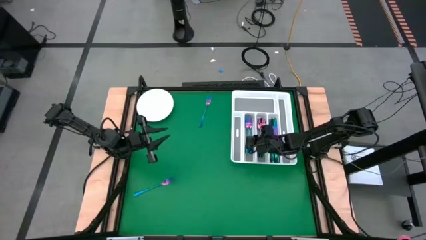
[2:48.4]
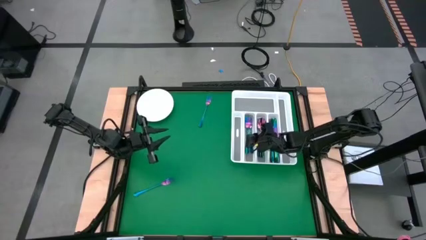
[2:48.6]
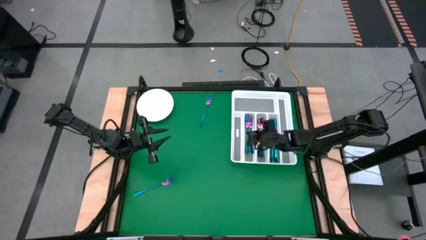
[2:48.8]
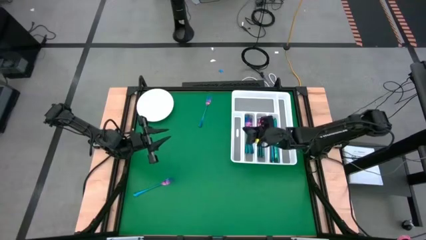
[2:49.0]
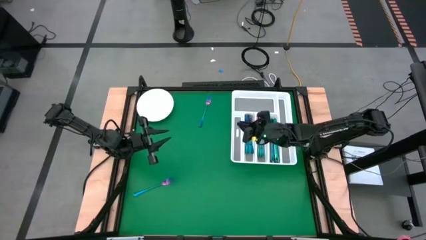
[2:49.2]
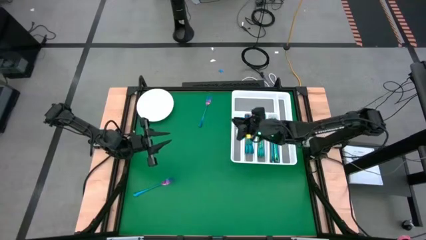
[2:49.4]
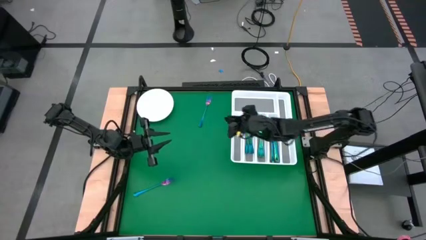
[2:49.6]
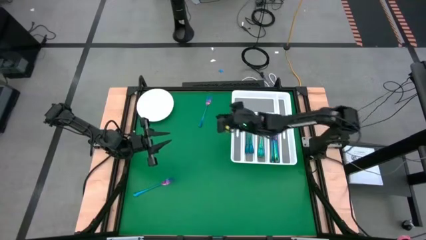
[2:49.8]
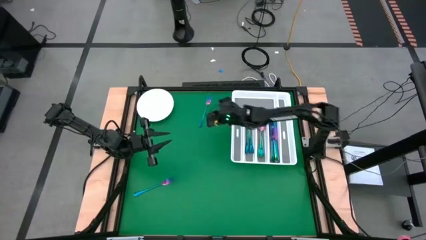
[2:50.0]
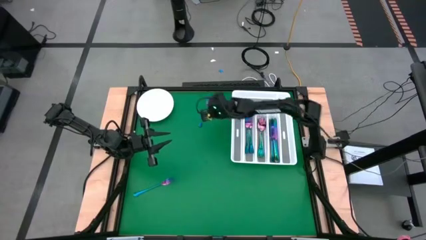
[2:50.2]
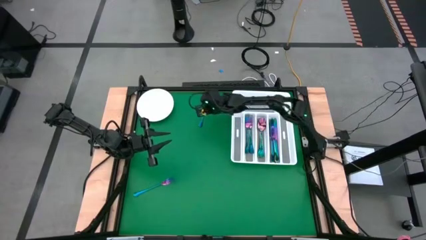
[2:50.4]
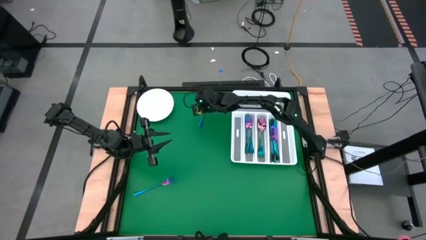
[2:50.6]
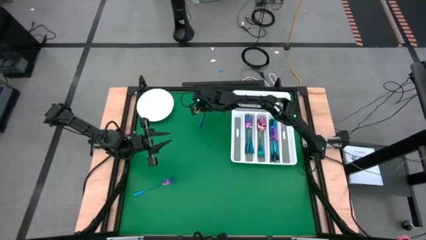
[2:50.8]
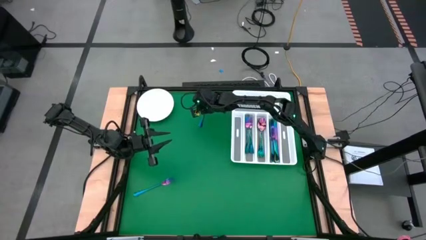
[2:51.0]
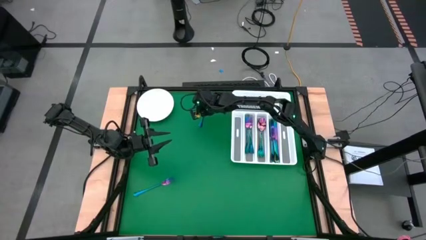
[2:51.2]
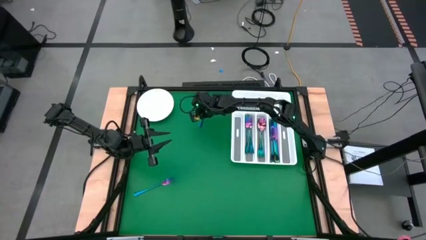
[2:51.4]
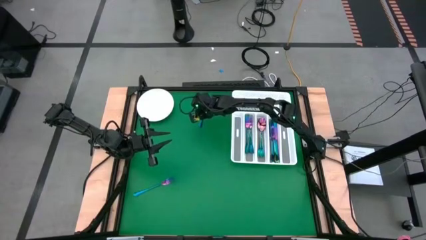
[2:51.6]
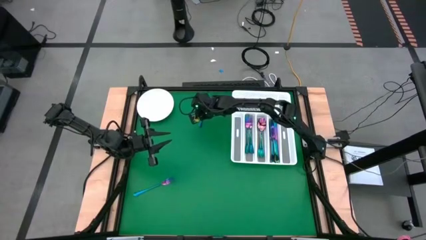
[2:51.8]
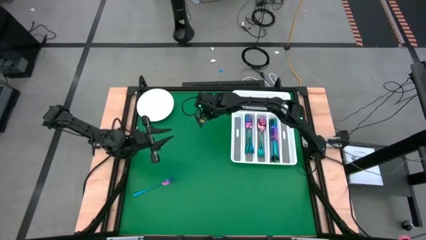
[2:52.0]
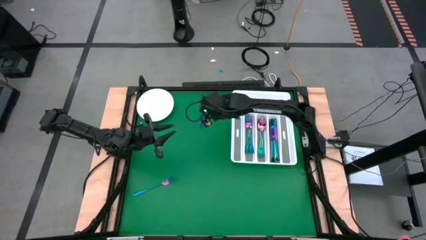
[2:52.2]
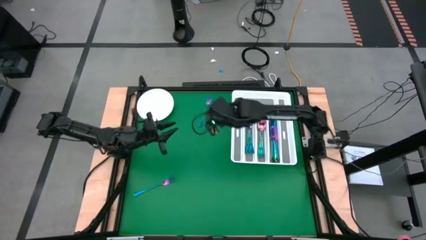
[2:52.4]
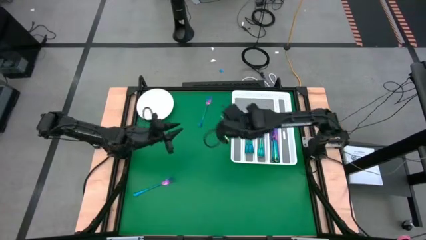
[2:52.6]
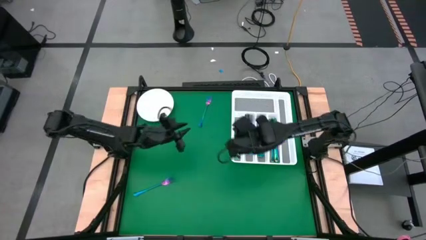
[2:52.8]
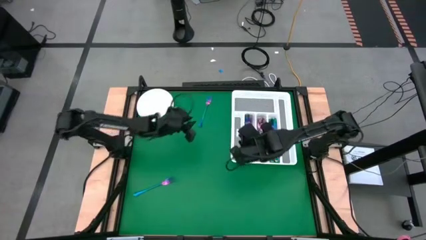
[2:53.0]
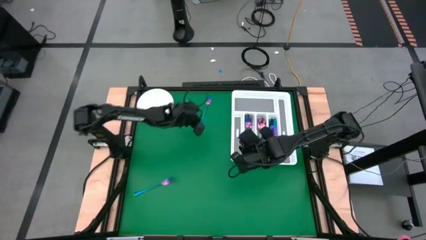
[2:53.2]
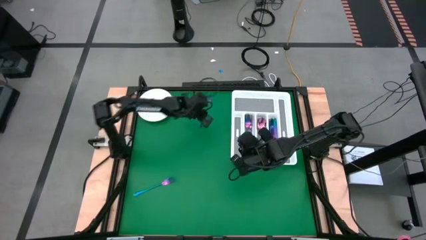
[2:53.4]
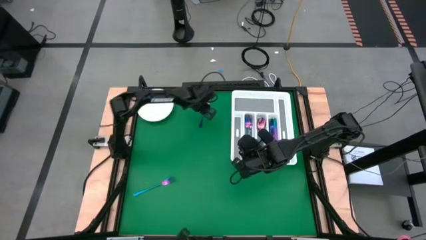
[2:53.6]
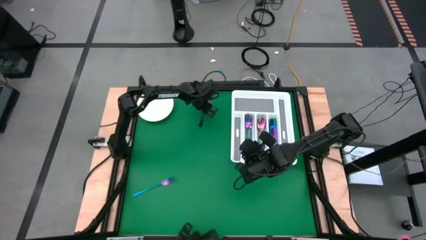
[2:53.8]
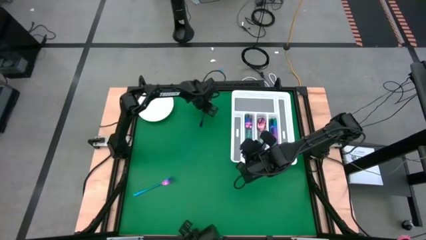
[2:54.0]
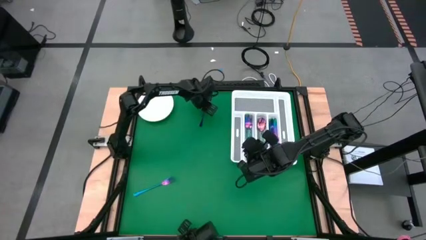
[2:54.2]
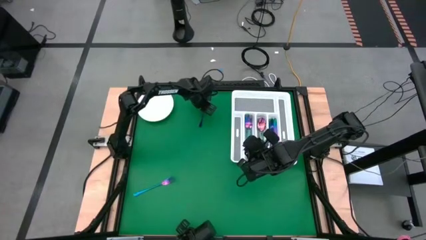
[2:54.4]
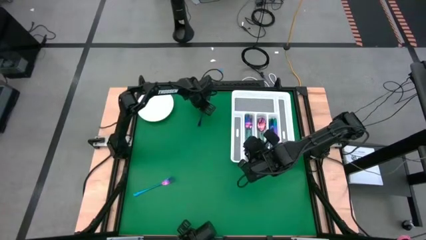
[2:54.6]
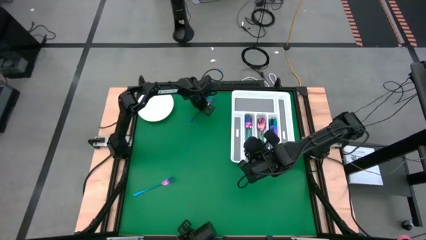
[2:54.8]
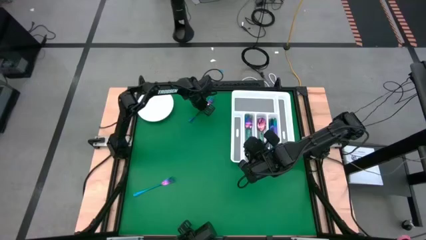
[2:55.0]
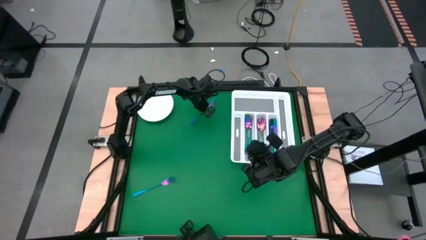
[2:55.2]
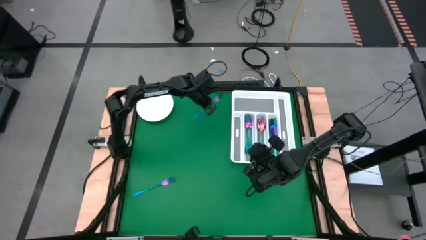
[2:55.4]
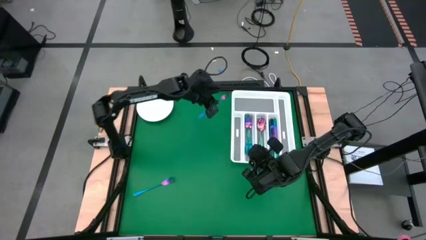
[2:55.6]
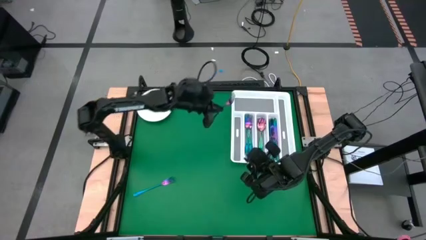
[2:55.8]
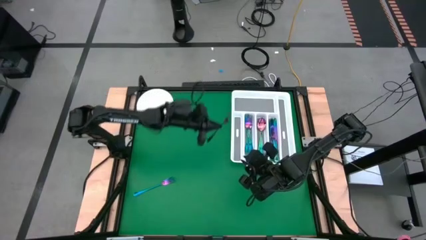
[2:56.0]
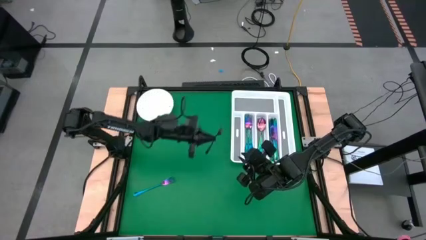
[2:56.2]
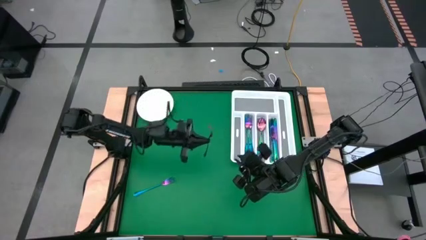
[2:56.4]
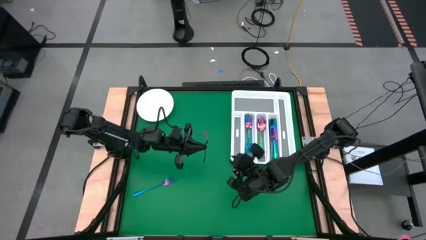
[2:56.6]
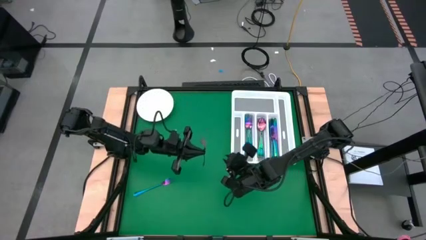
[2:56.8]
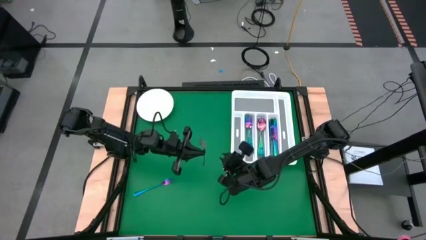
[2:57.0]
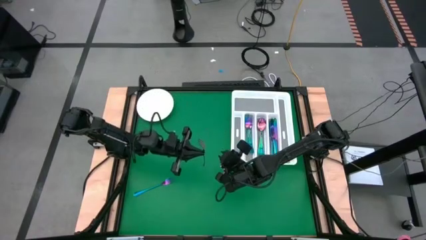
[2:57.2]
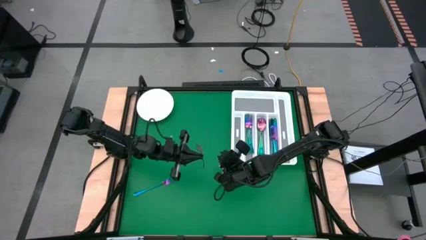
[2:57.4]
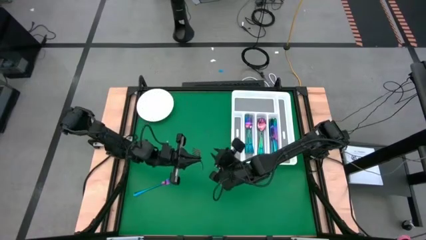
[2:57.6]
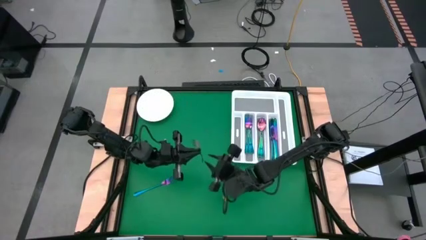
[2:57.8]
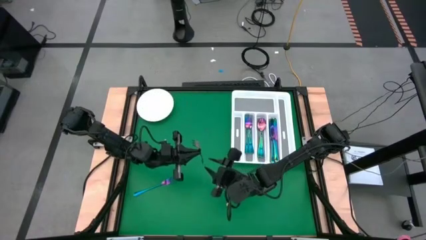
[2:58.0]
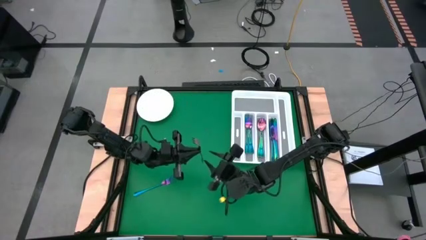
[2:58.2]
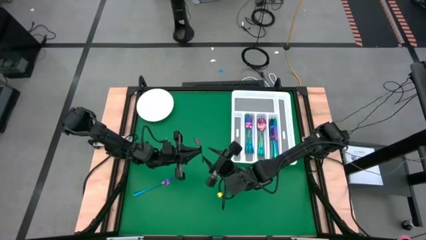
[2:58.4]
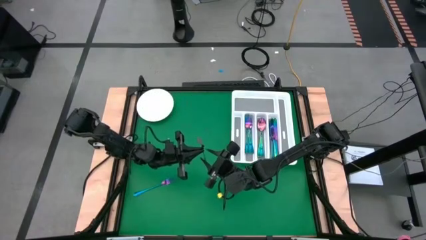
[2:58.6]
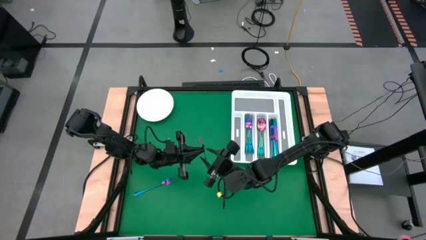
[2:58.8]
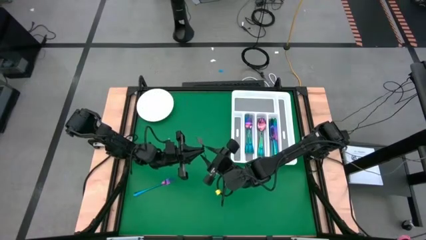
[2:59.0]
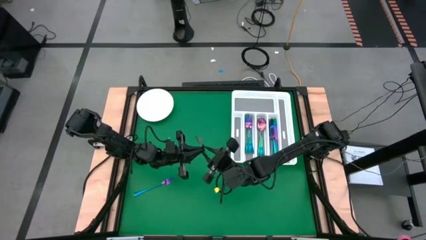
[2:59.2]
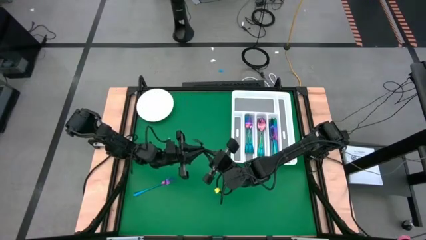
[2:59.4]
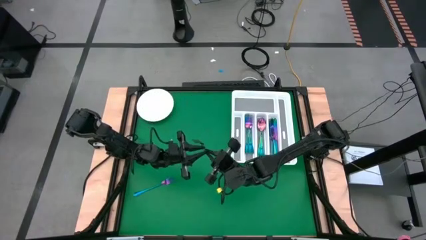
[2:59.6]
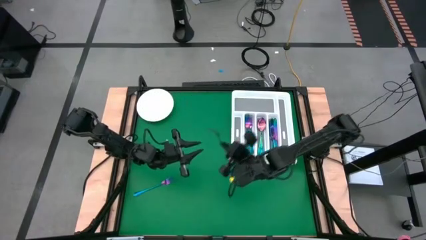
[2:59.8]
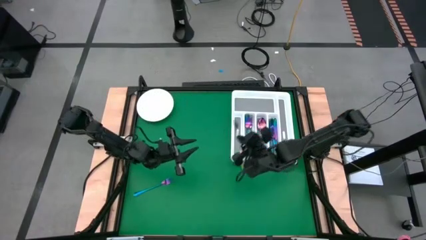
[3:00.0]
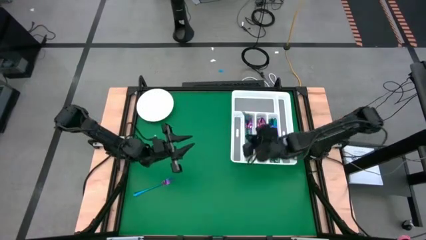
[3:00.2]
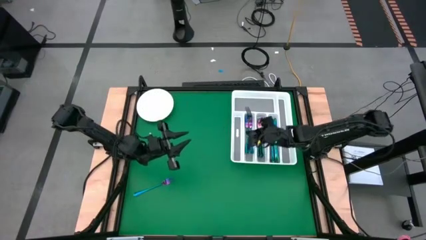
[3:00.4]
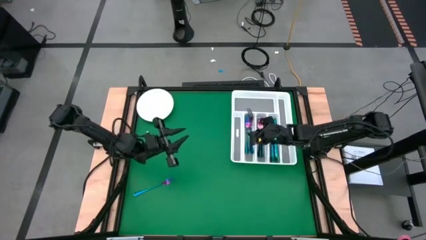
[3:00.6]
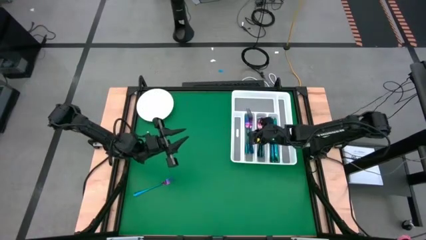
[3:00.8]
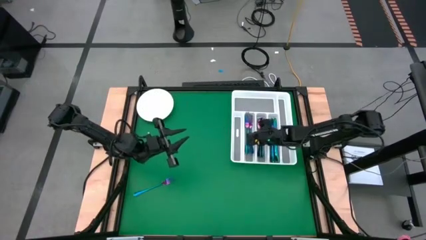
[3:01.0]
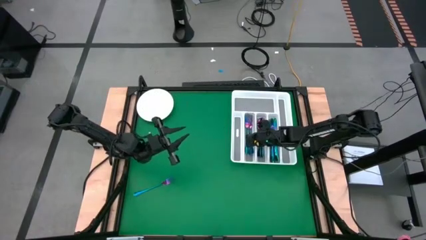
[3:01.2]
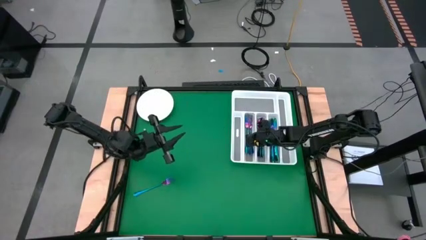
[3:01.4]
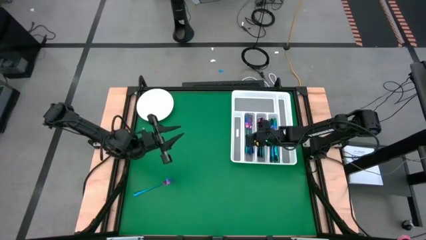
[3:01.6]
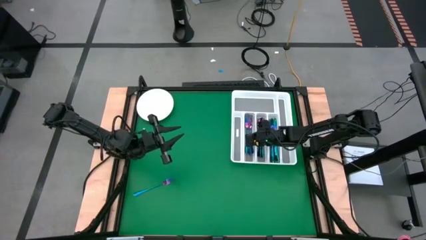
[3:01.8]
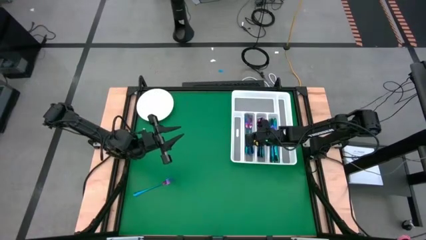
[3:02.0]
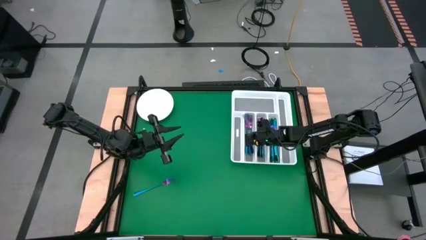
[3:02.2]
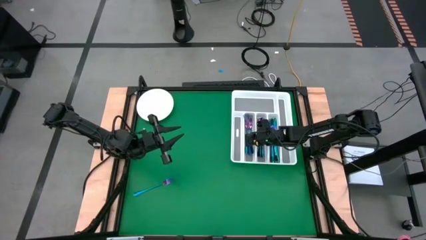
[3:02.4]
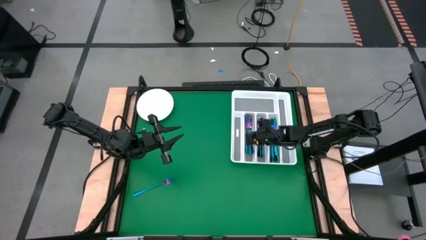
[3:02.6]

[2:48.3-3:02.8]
Task: Sort silverware
Put the blue fork into the white cutlery tray

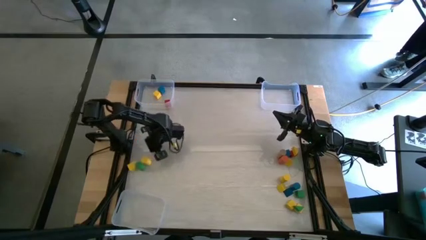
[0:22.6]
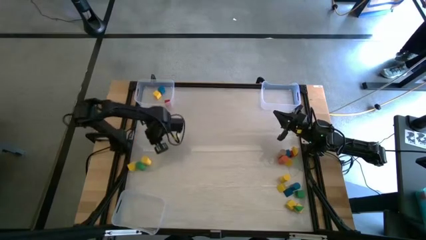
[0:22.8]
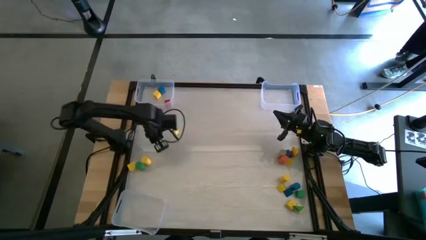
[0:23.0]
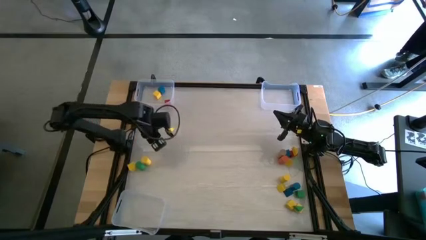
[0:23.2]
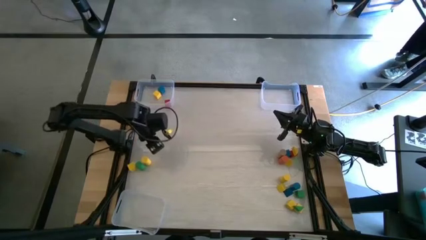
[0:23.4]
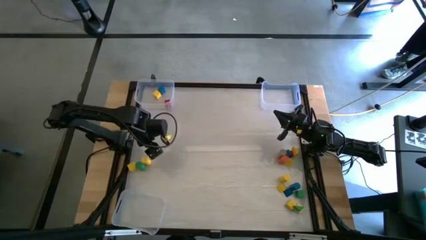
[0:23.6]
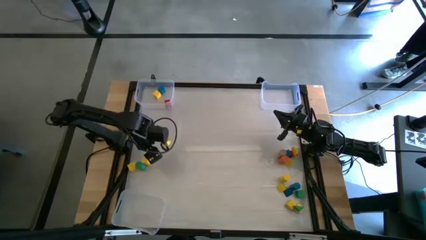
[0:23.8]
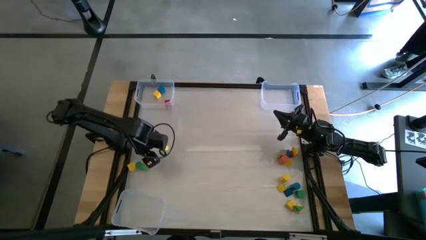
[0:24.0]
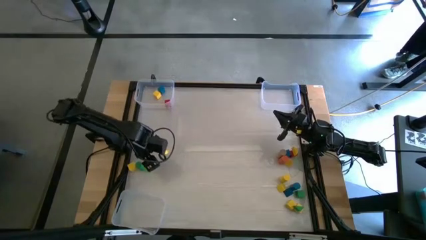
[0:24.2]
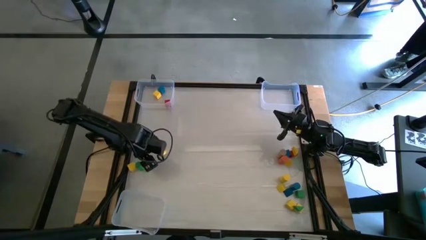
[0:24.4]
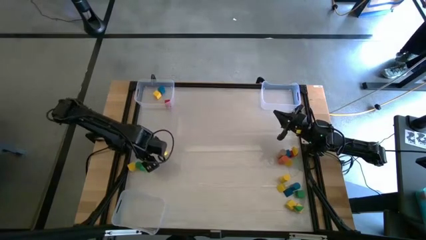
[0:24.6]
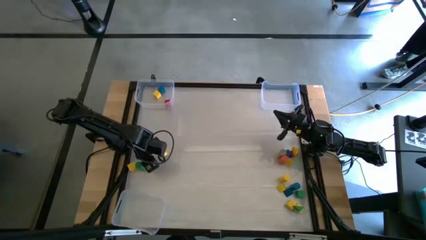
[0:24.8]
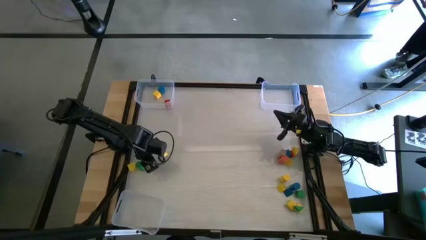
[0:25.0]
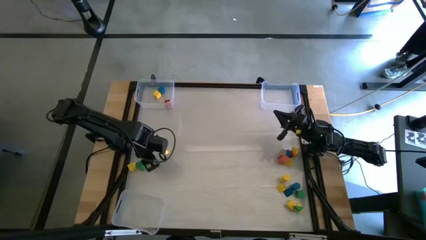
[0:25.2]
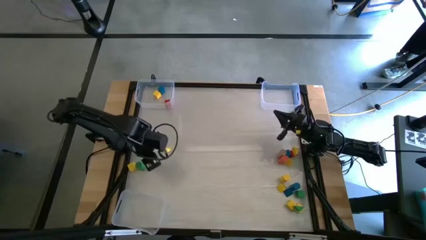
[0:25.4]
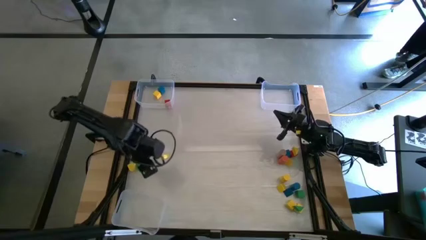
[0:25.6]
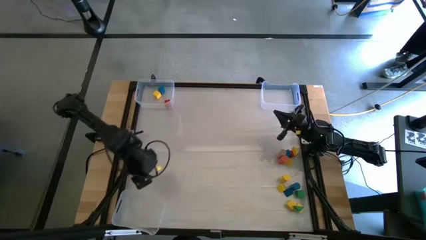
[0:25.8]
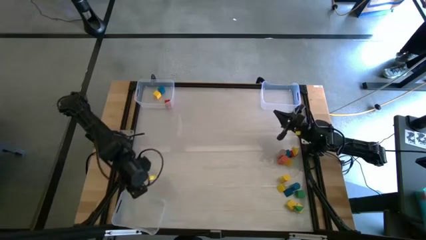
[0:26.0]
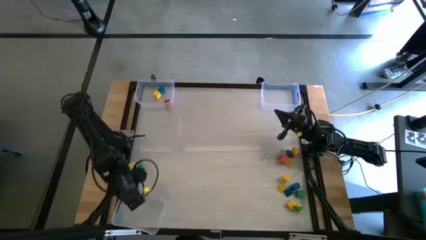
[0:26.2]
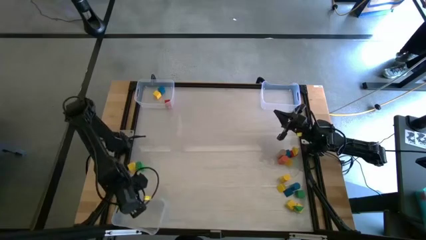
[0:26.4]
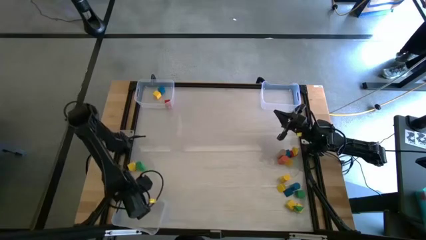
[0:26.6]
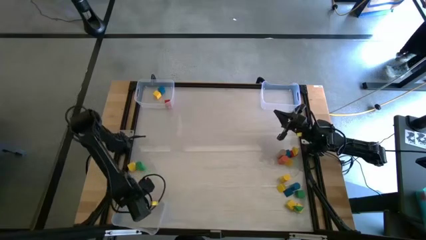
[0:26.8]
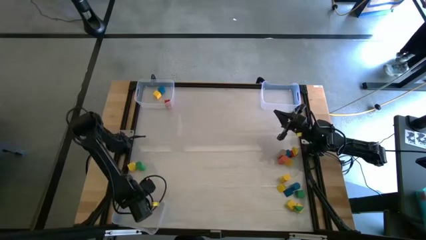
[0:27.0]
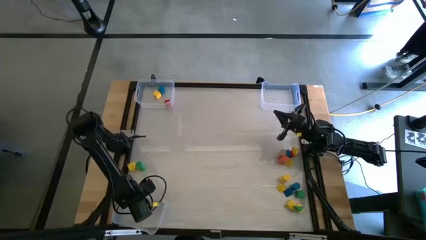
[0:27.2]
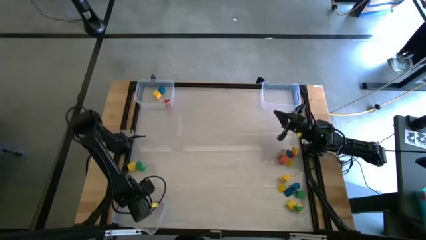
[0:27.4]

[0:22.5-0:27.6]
Task: Sort blocks by size
Put the left yellow cylinder block into the bottom transparent bin
